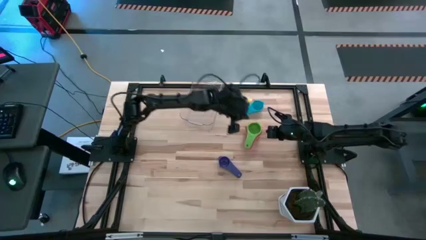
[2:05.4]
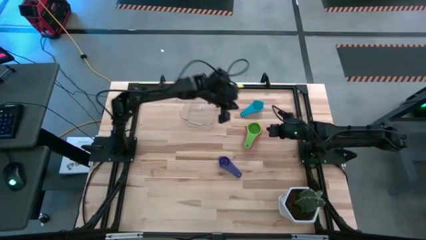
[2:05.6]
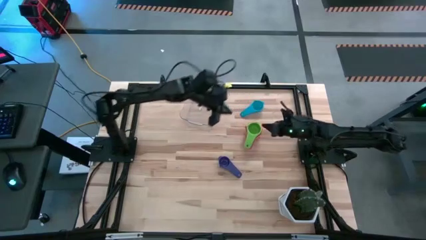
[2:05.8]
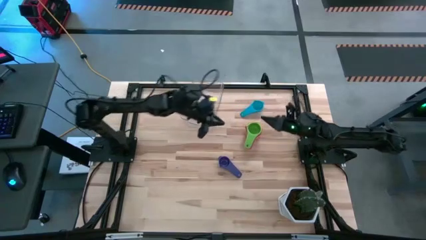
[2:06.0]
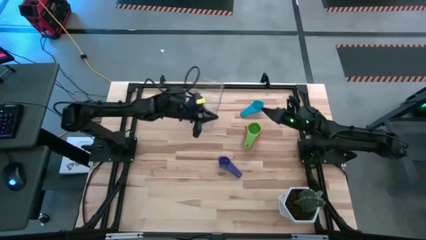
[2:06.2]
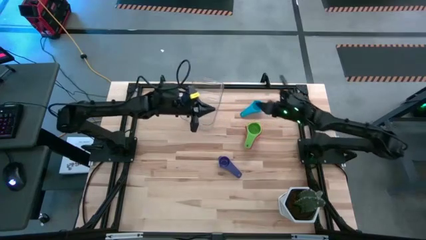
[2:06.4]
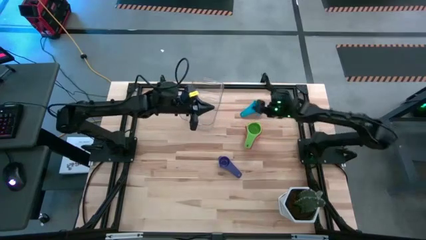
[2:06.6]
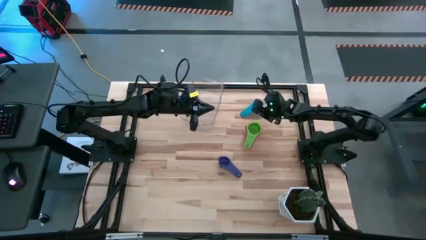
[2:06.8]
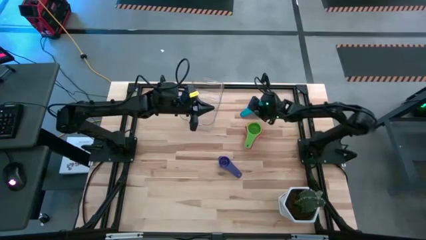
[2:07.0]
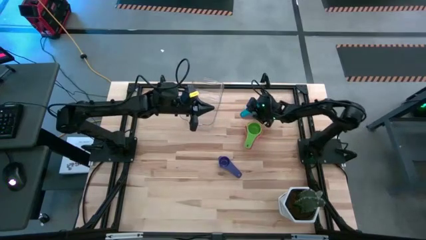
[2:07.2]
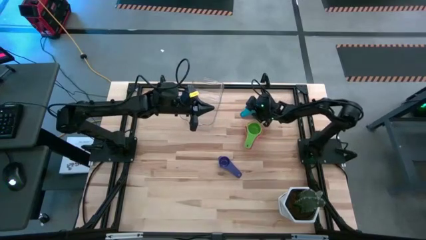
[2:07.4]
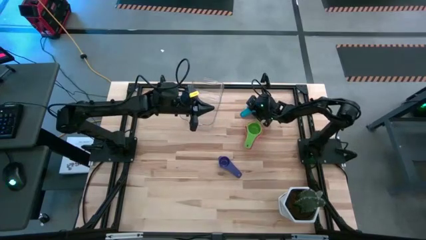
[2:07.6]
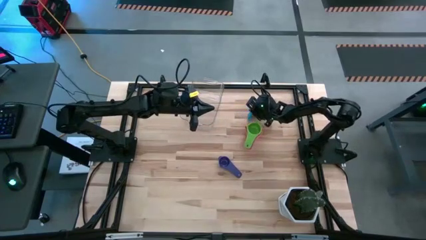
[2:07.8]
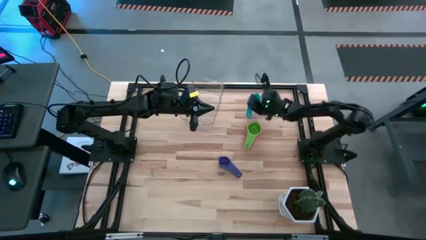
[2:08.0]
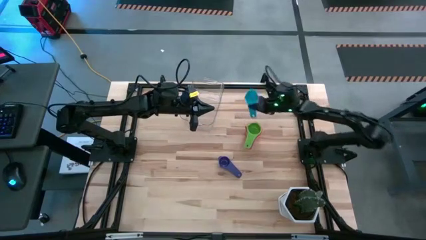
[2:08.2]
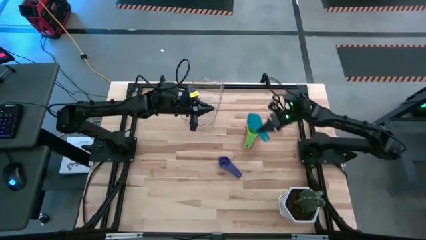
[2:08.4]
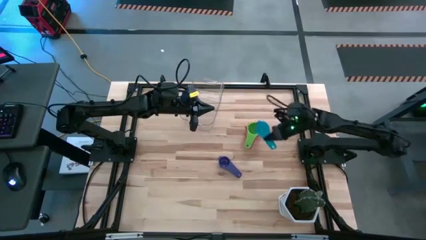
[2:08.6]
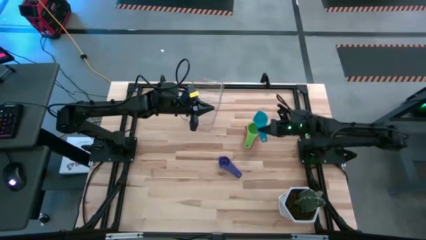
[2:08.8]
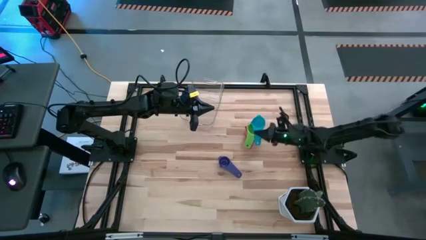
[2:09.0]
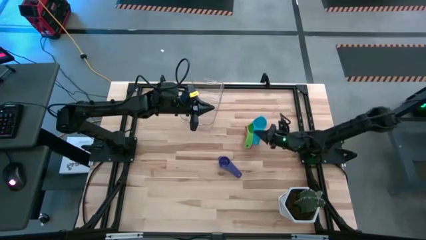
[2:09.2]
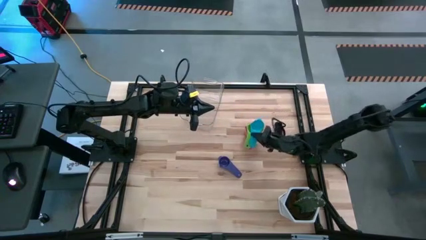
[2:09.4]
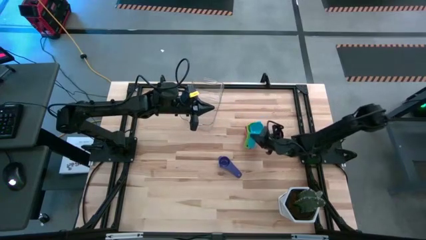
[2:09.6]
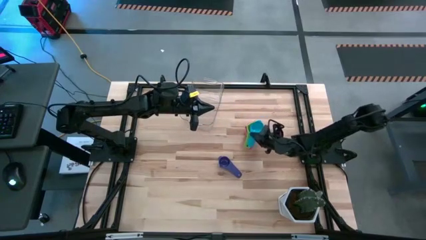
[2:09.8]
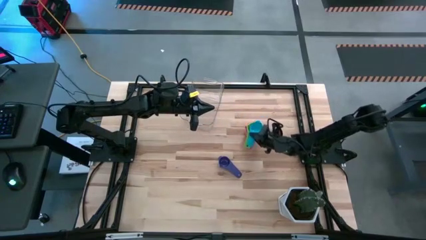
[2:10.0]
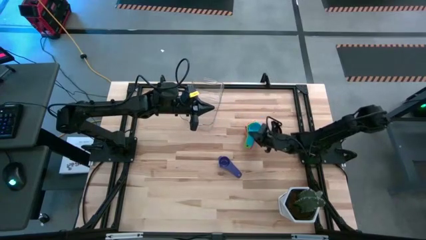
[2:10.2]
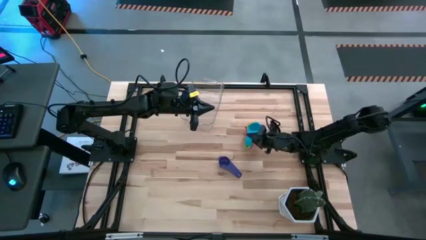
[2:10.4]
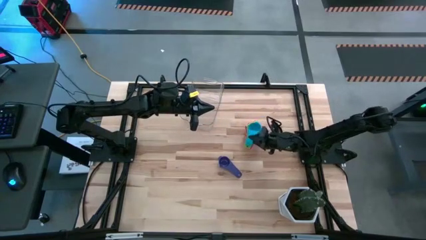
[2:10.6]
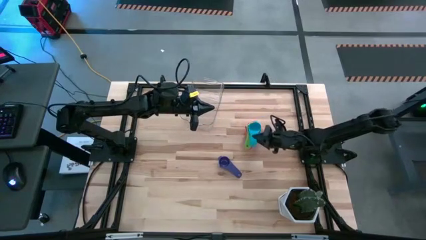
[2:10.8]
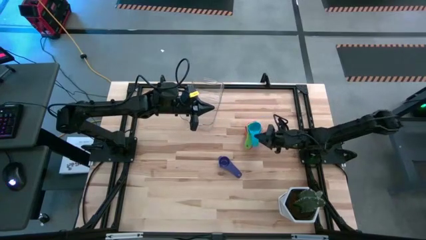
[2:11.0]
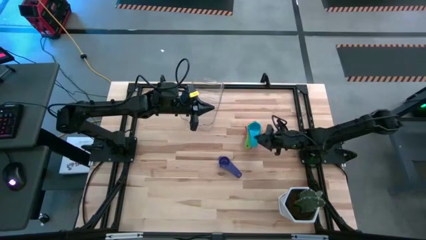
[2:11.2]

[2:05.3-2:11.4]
Task: Nest measuring cups in basket
Stack the light blue measuring cup on top of the green measuring cup

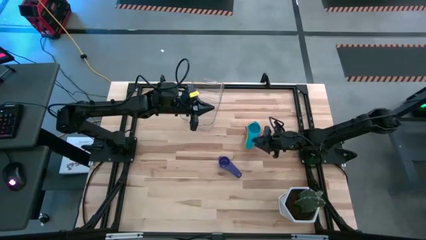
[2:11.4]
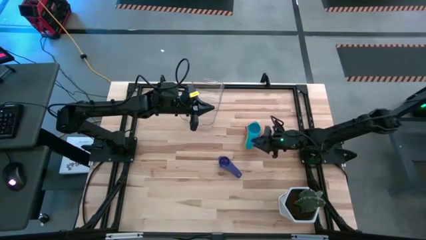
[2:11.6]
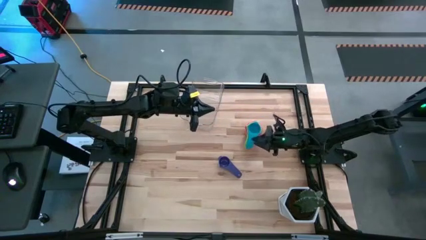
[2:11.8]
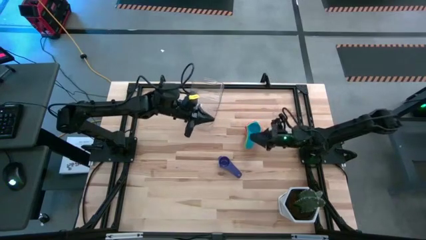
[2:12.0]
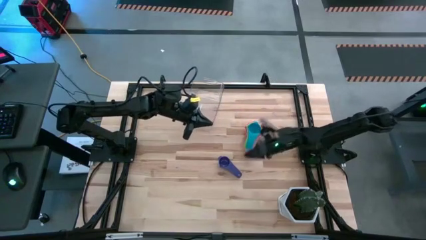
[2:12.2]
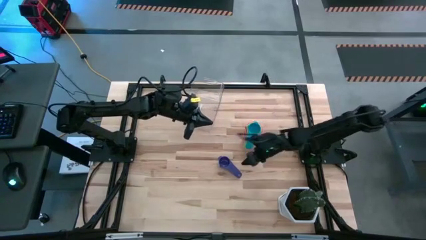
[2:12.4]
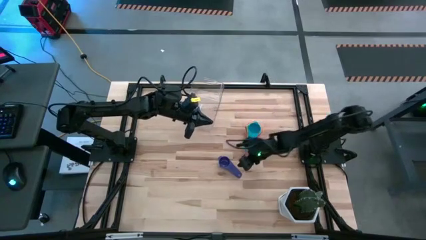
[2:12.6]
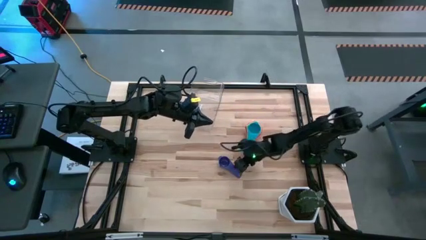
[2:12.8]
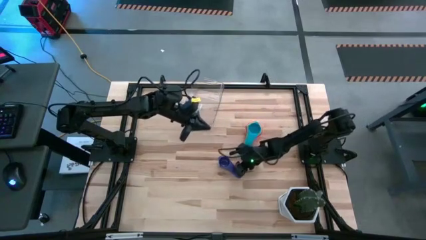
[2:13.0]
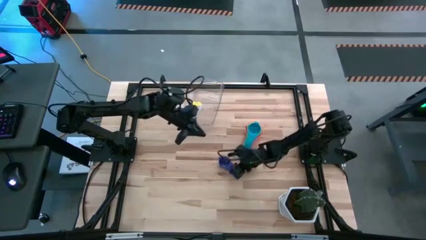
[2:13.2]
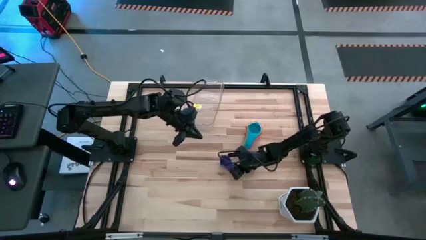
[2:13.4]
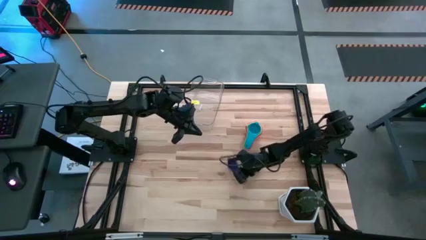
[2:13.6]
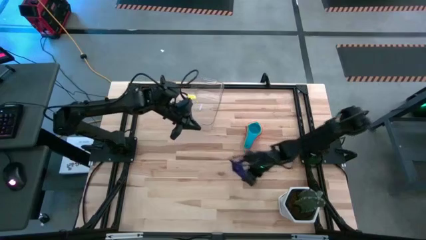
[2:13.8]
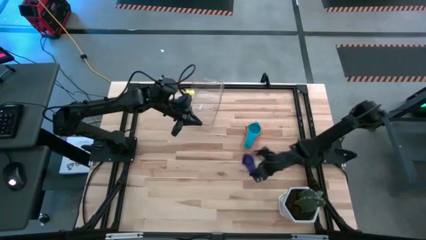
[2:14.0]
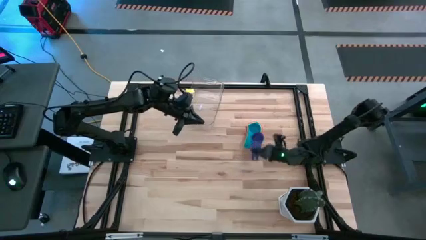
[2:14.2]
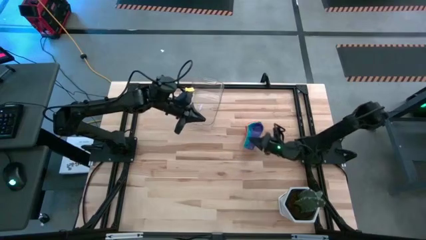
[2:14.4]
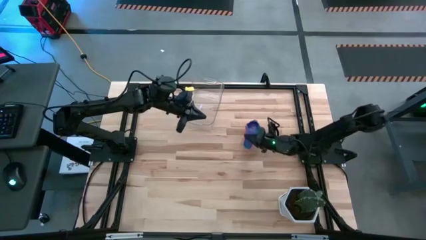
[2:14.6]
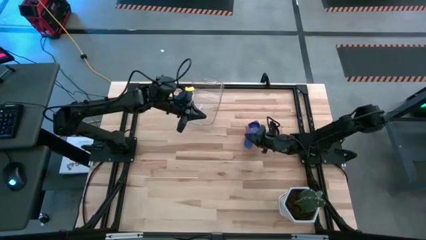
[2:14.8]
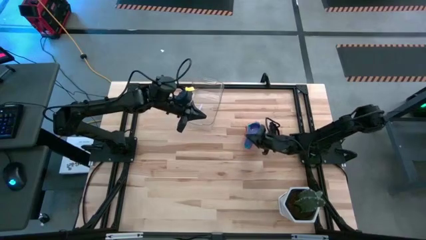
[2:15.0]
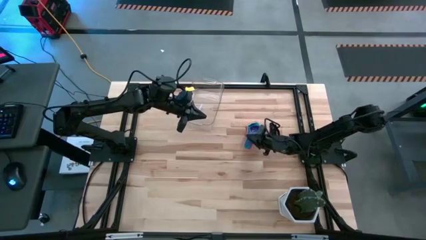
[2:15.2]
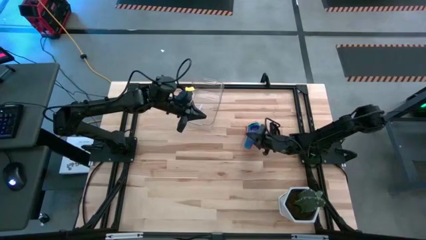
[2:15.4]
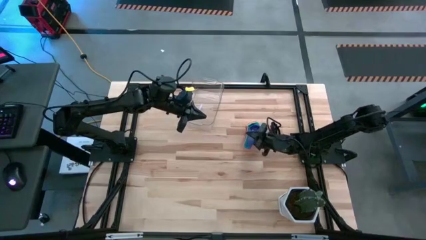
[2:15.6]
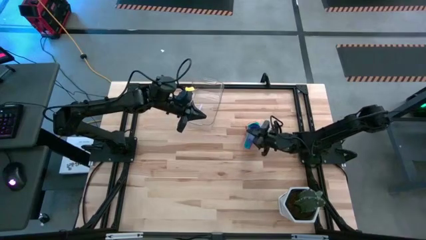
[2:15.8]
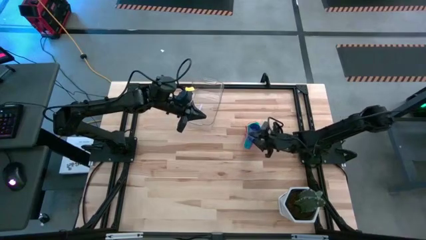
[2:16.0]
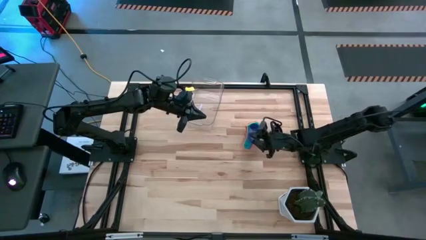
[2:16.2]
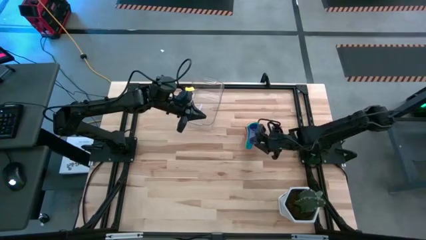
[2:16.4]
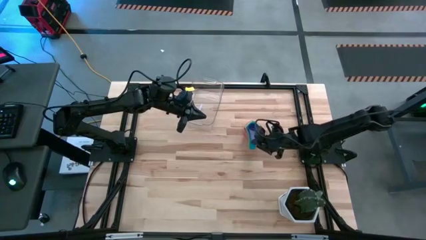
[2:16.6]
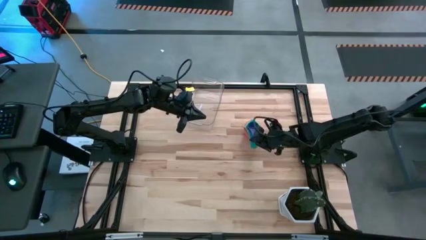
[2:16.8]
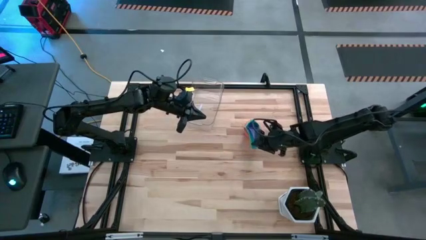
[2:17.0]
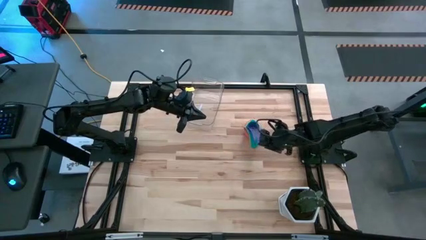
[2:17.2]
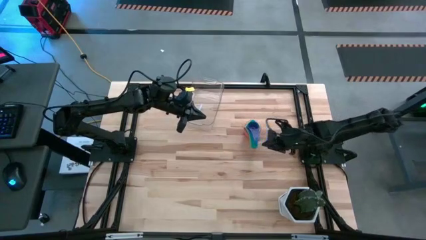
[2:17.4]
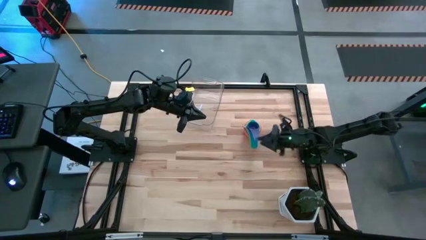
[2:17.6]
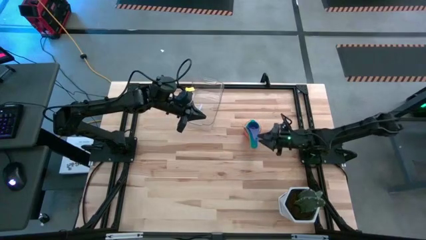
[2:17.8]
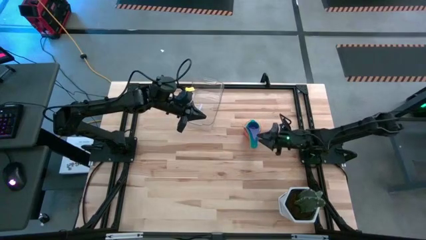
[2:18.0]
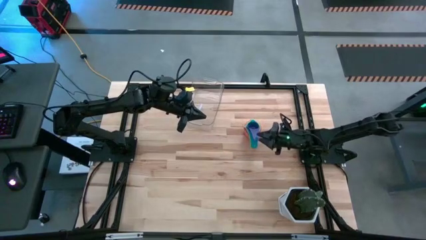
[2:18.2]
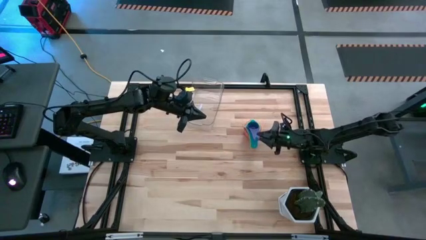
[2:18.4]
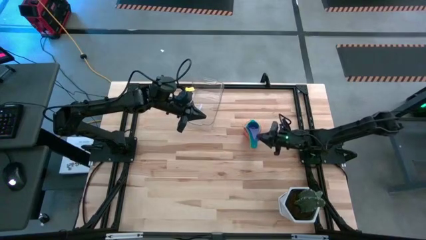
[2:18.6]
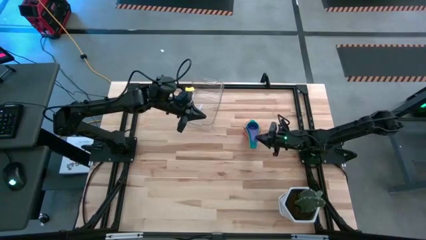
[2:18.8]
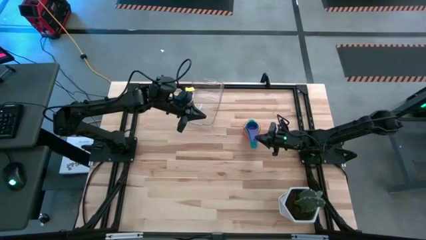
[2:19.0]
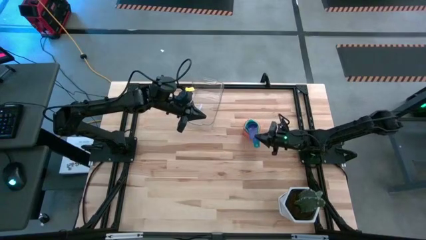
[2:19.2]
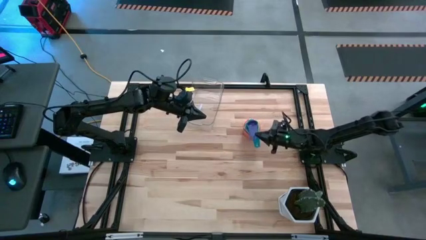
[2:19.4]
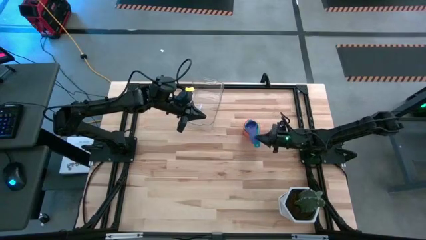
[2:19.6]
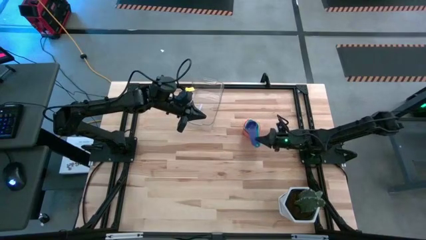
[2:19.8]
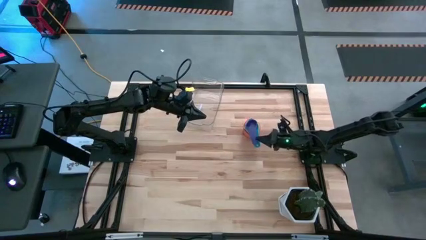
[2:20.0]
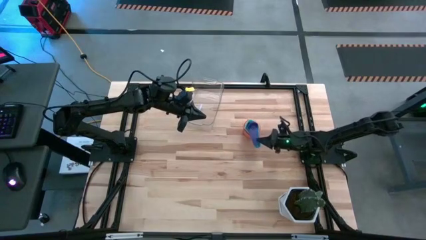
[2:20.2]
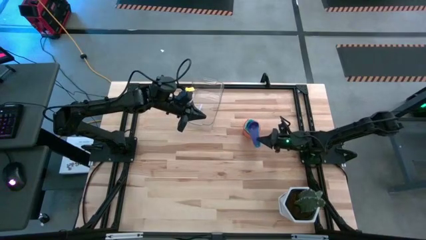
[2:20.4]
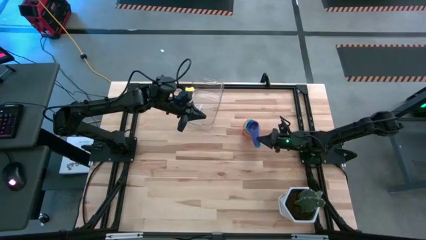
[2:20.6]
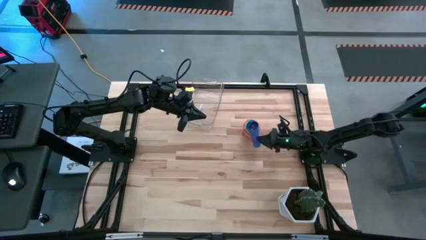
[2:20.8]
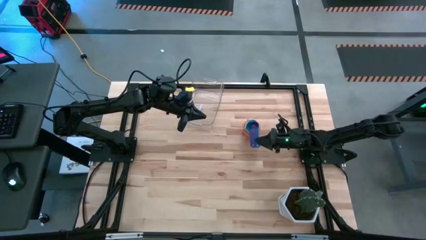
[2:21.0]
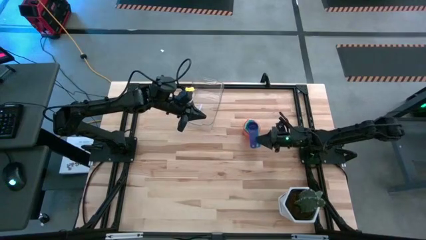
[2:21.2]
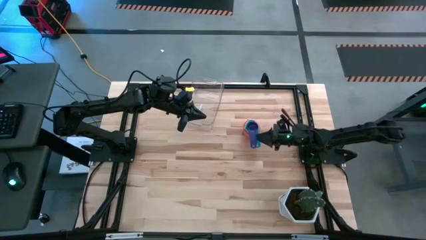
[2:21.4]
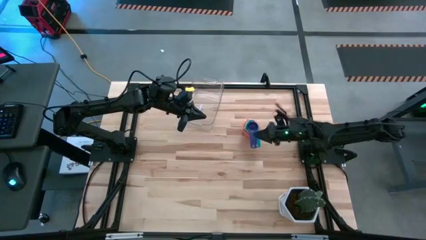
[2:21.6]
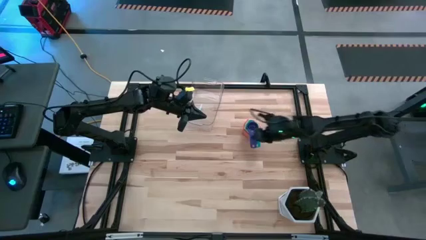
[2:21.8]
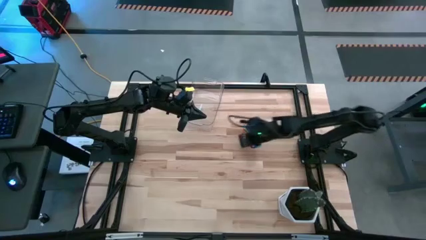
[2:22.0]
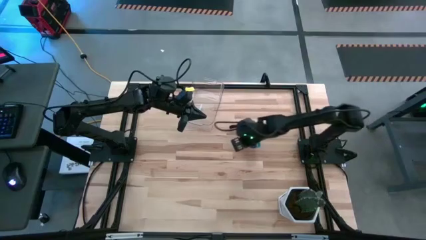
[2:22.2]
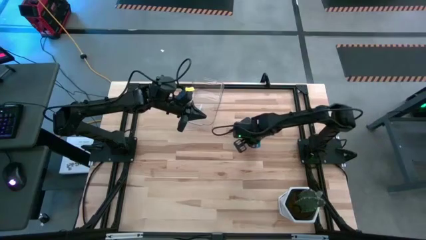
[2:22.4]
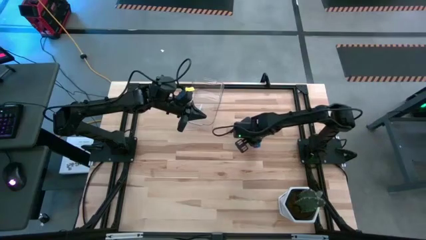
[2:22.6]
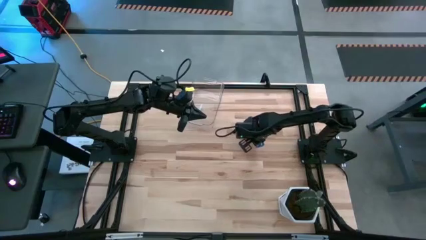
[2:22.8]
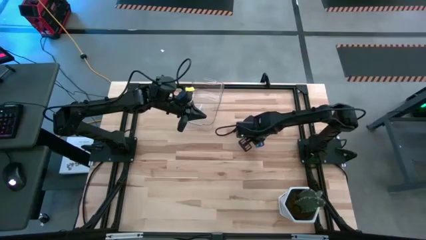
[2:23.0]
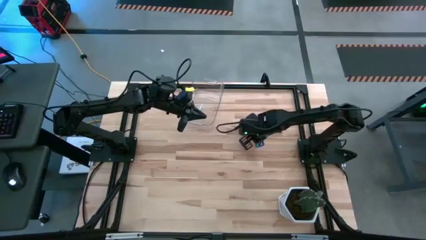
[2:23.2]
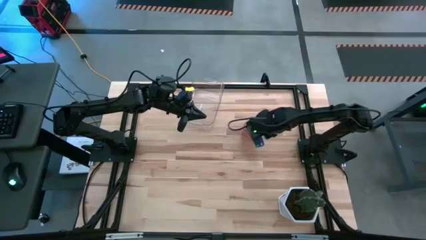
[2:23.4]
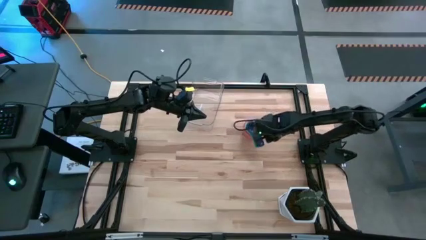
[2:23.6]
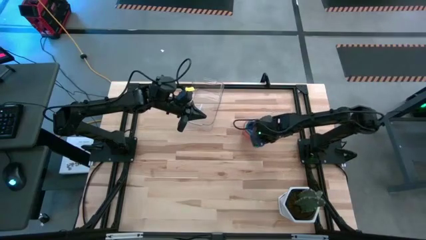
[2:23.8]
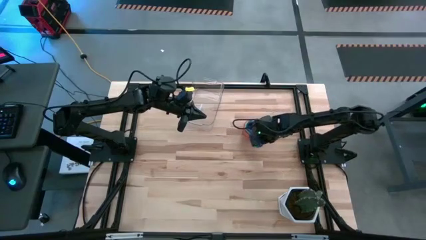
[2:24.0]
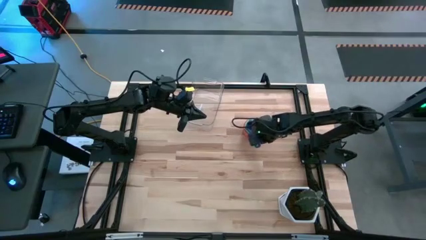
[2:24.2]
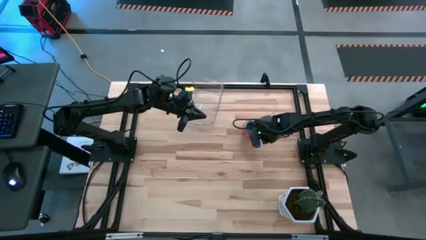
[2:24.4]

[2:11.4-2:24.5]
Stack the purple measuring cup on top of the light blue measuring cup
